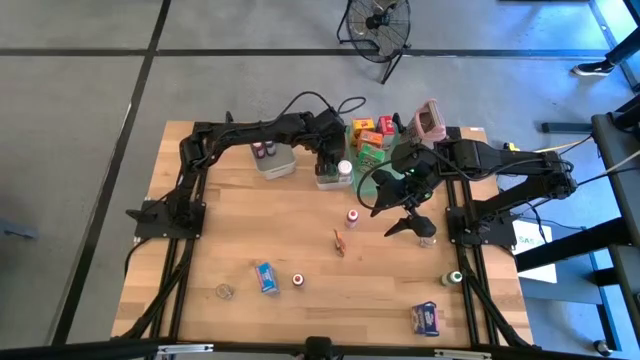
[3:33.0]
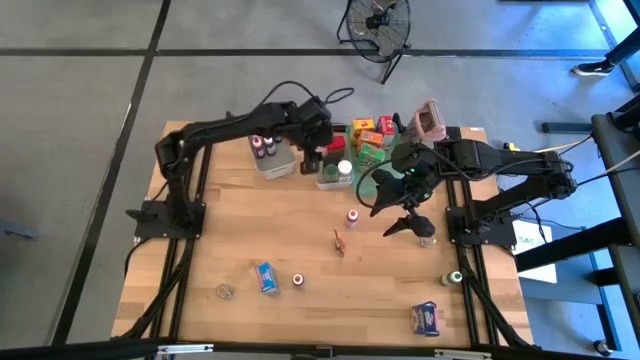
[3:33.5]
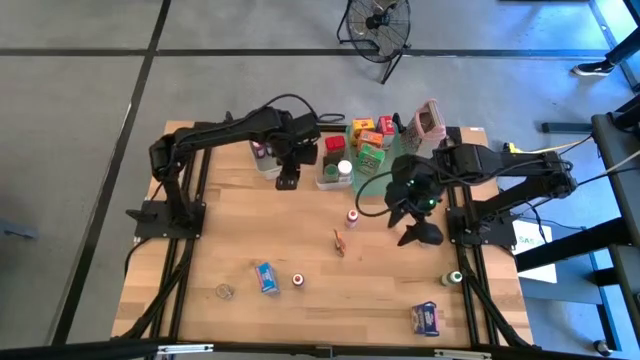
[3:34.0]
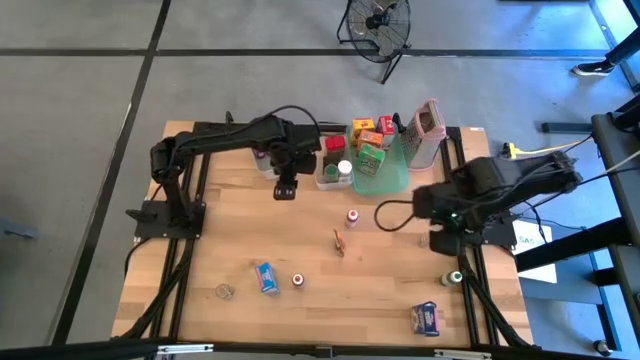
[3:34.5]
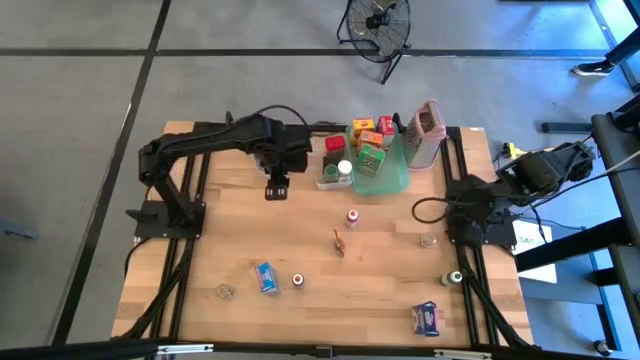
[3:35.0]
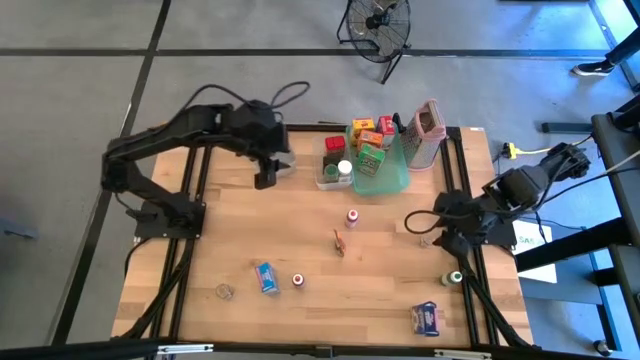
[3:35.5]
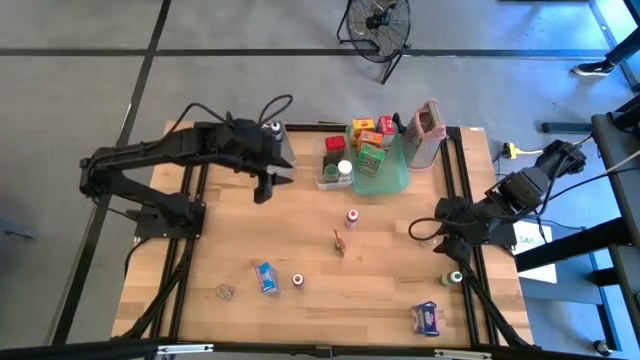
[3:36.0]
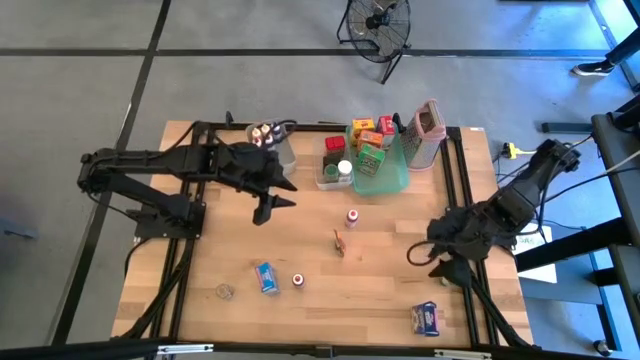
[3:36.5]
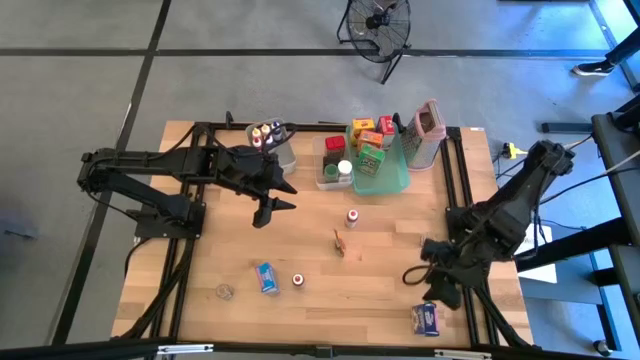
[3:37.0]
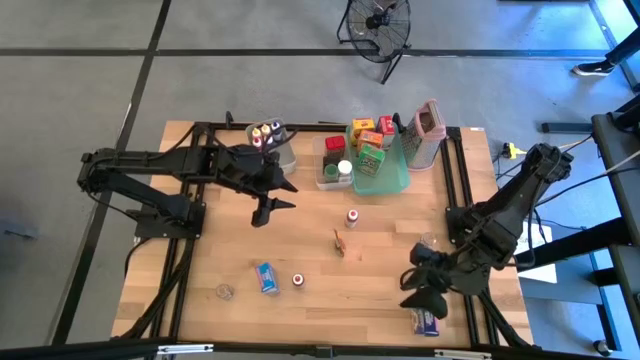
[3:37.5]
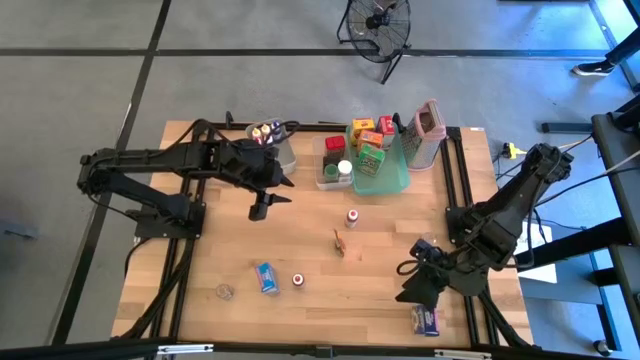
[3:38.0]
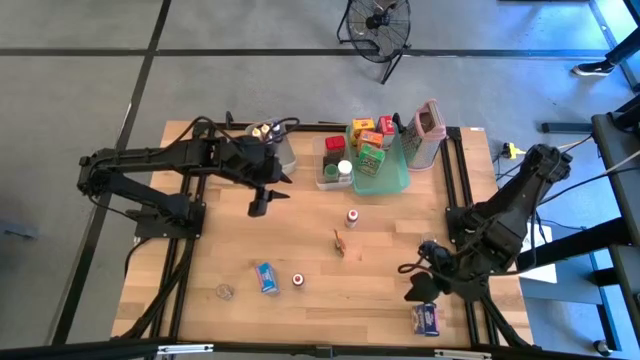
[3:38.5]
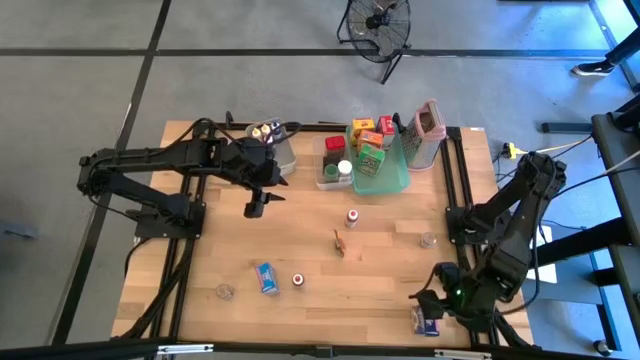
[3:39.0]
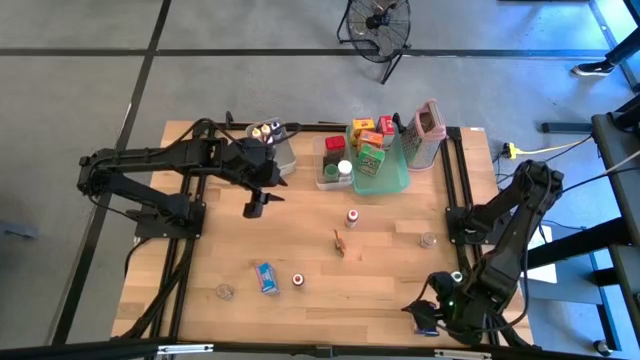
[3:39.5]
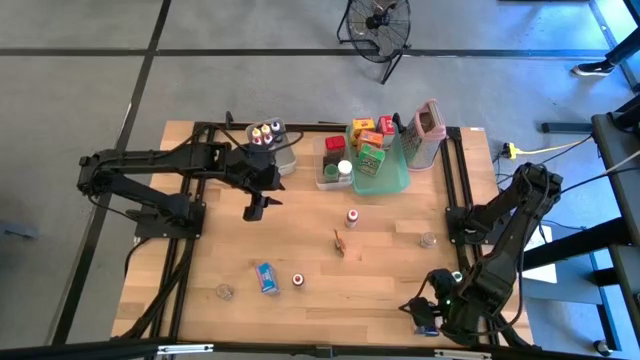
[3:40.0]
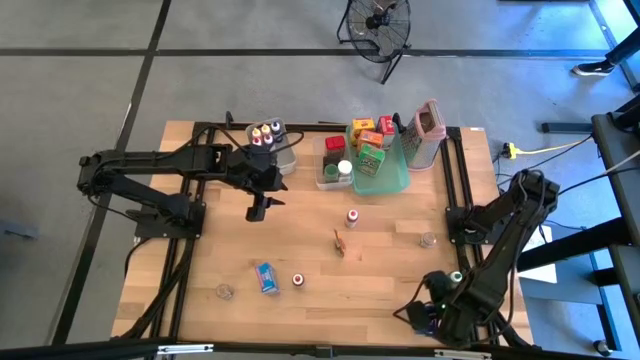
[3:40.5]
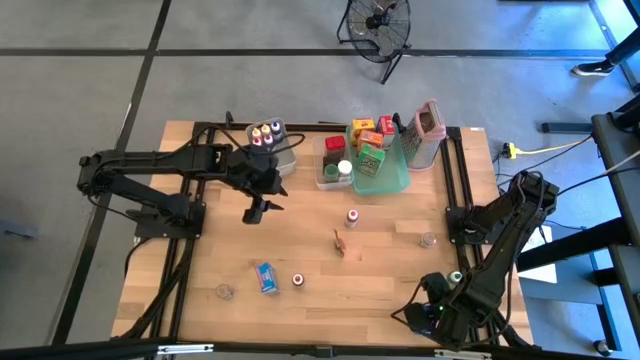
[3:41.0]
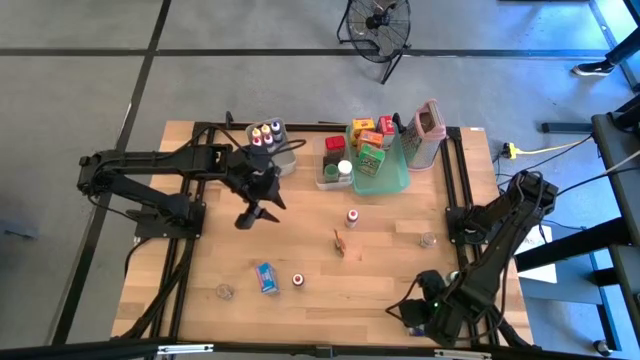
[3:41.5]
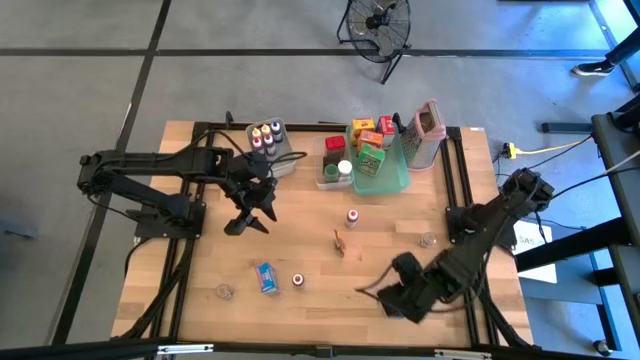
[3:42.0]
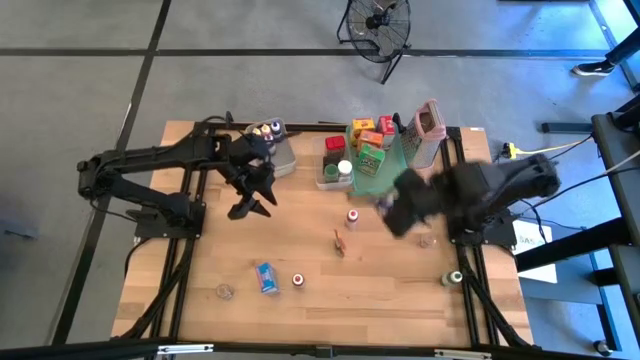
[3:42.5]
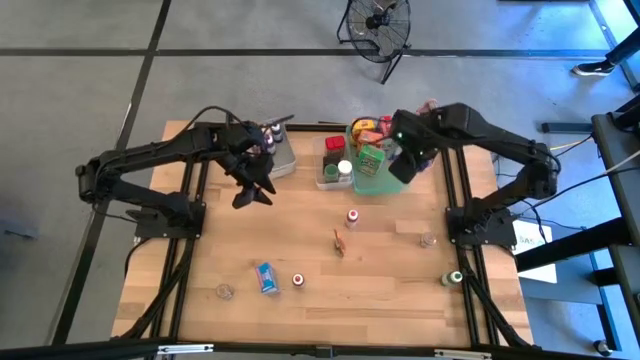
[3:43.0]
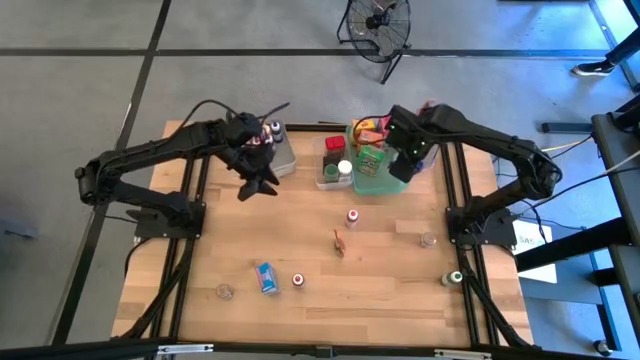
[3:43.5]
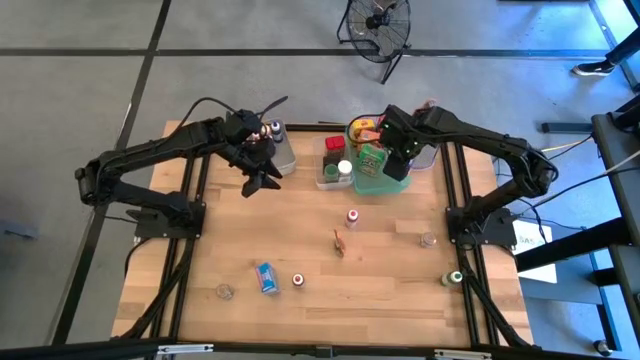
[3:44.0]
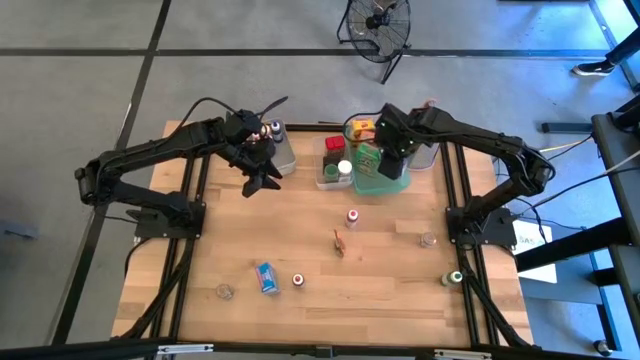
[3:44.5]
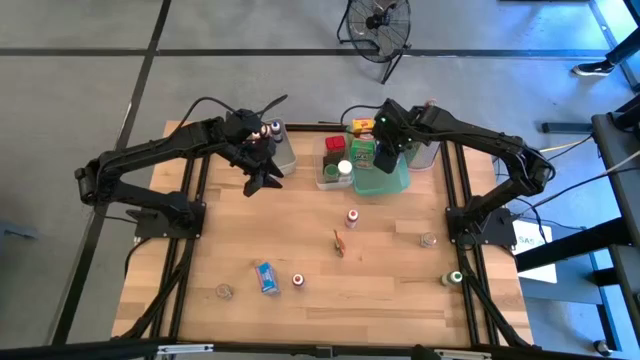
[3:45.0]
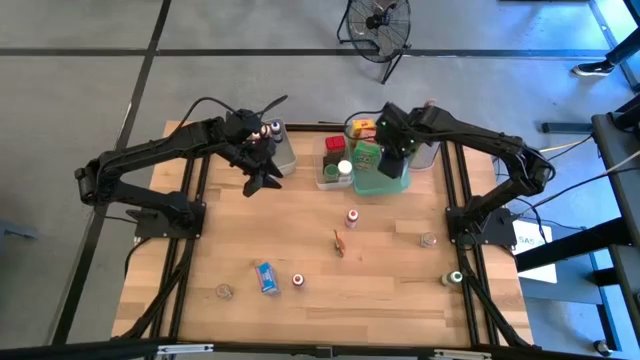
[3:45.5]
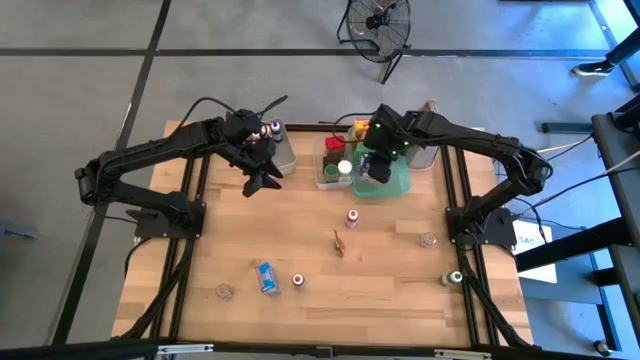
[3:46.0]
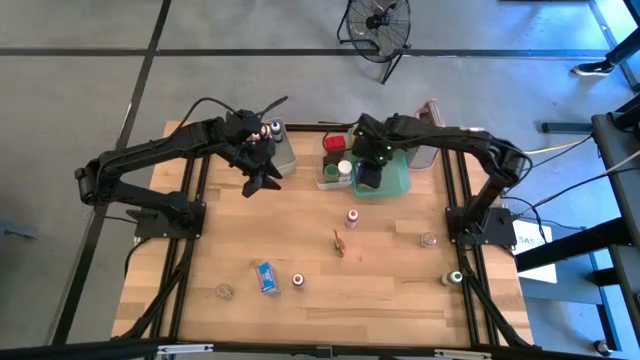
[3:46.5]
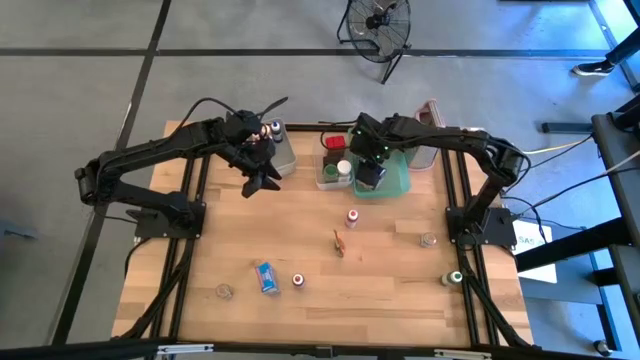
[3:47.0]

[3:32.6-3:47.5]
Task: Pick & Place Kitchen Items
Put the blue cereal box into the green bin

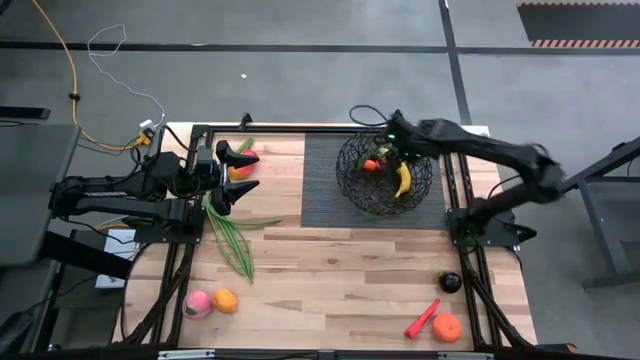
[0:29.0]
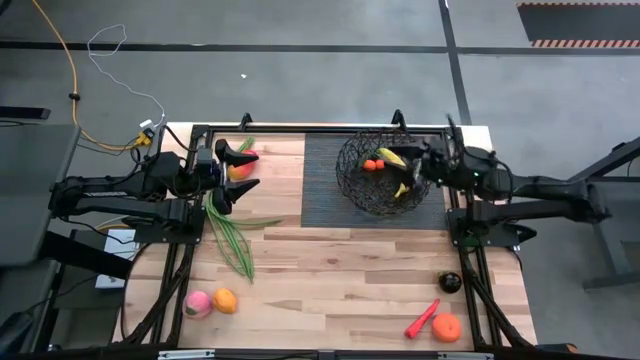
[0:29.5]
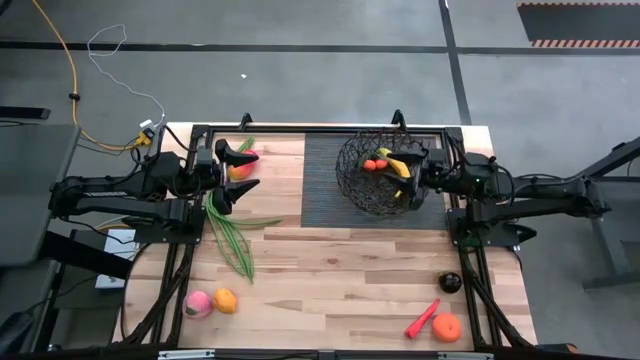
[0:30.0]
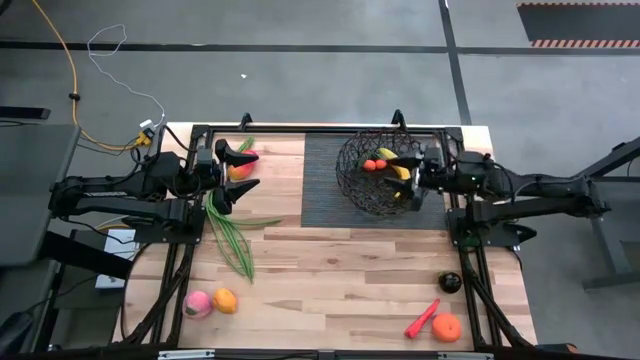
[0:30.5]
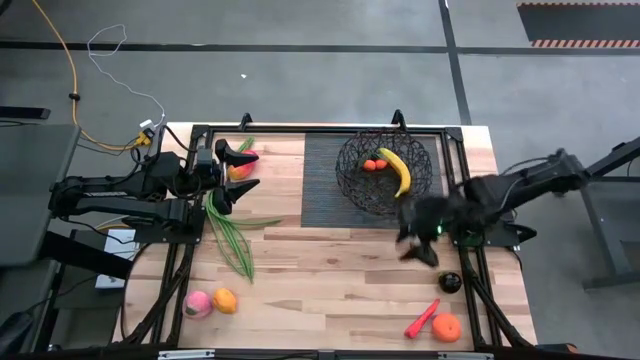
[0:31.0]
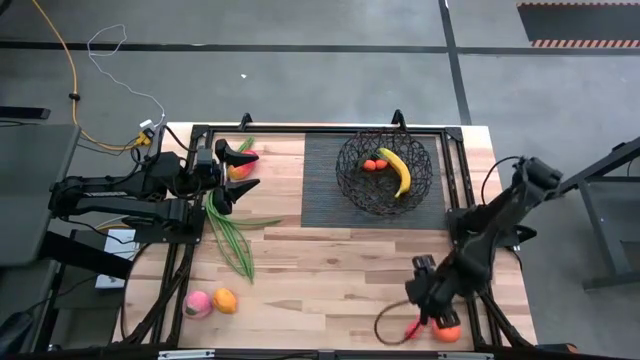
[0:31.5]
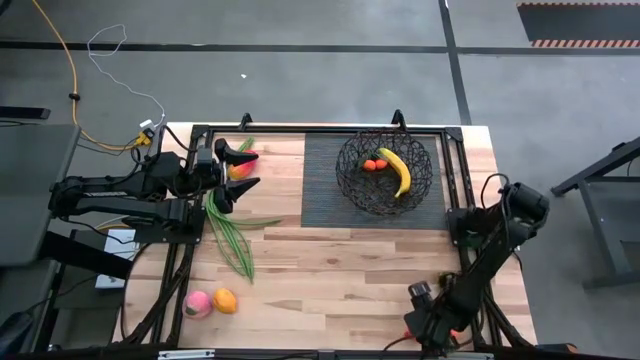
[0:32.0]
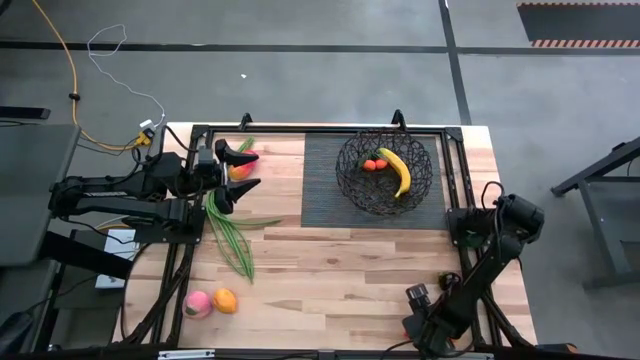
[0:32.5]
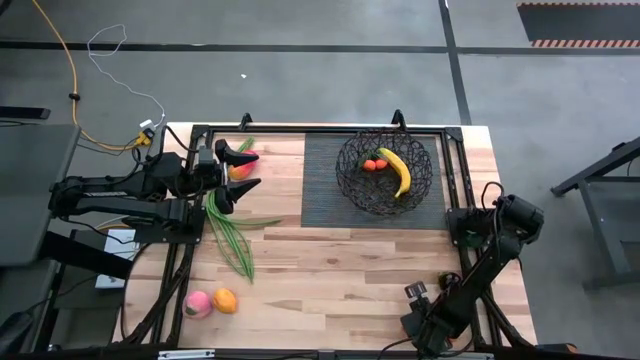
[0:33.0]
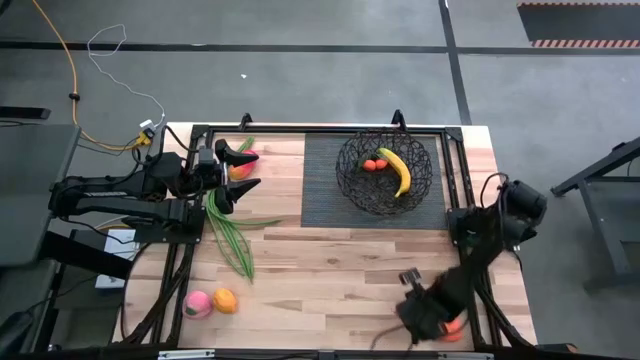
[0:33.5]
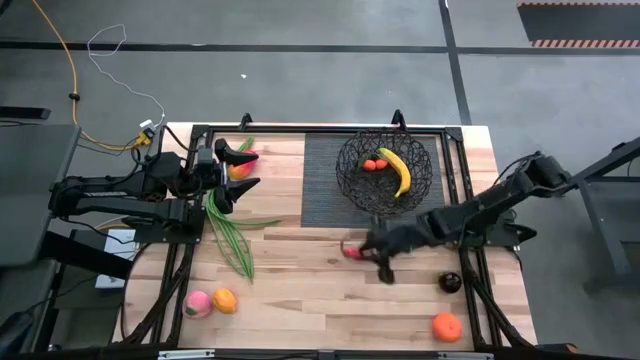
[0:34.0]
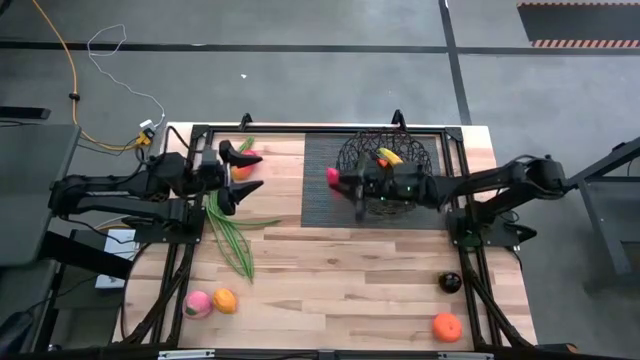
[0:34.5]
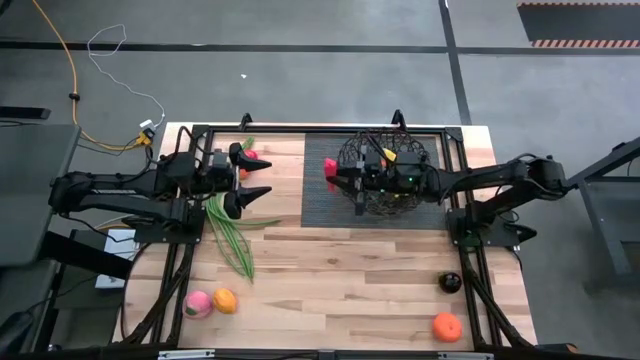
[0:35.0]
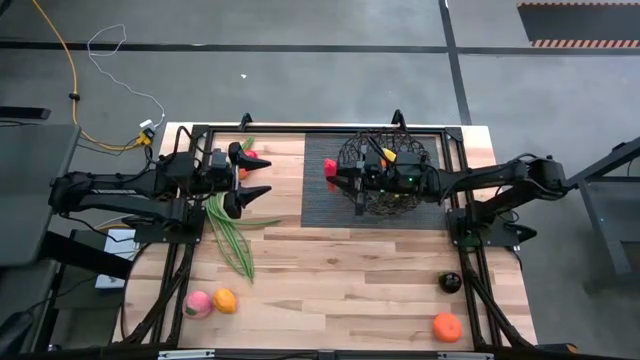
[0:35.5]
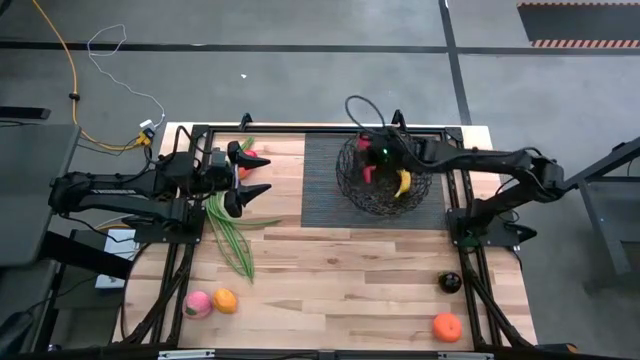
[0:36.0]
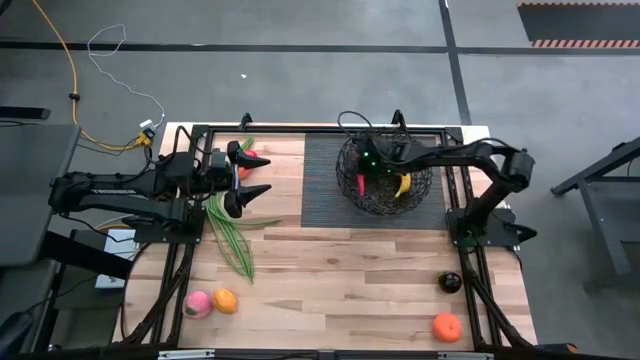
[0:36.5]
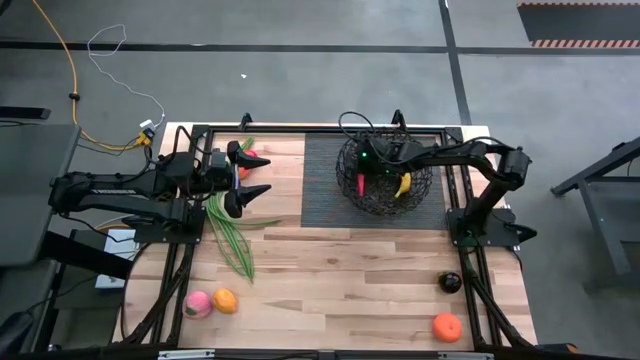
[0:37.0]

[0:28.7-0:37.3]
Task: Build produce basket
Put the orange carrot into the black basket
